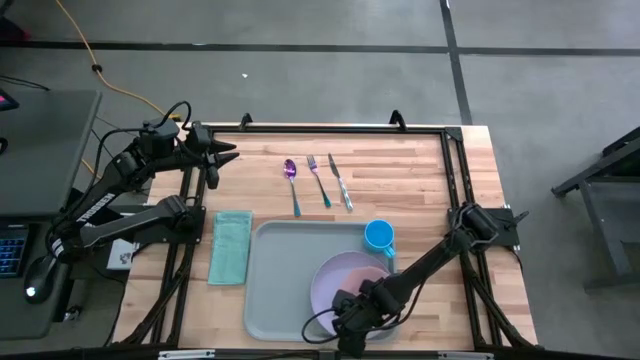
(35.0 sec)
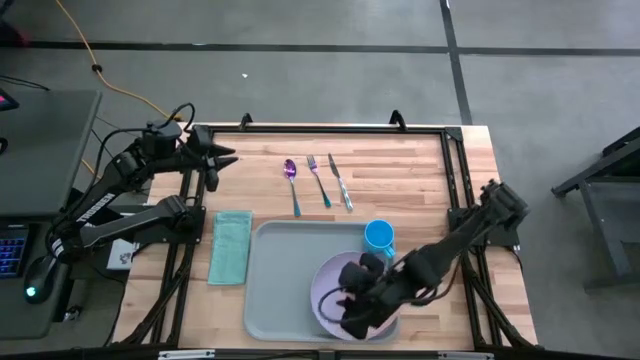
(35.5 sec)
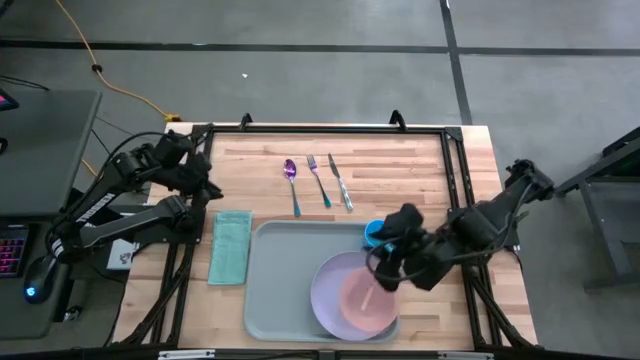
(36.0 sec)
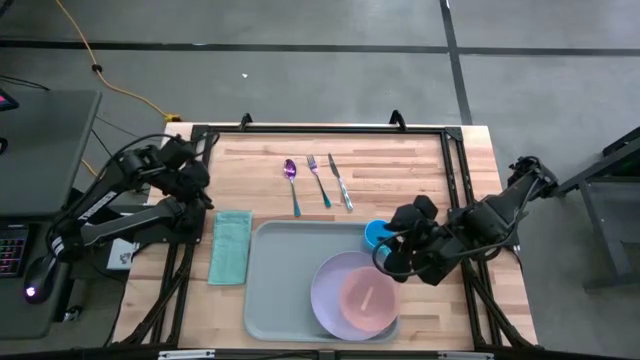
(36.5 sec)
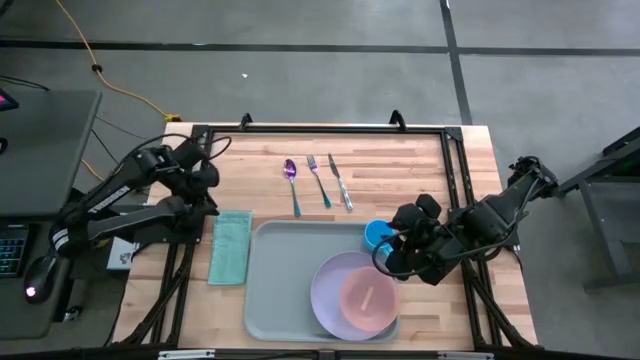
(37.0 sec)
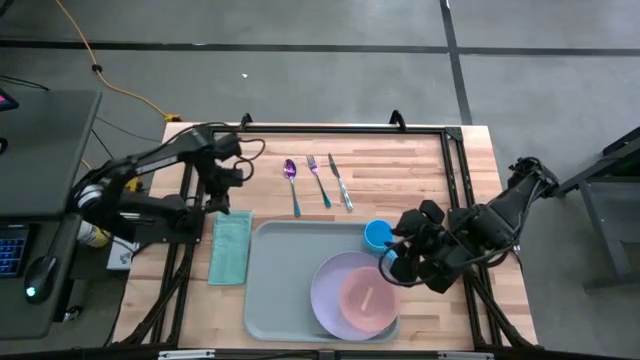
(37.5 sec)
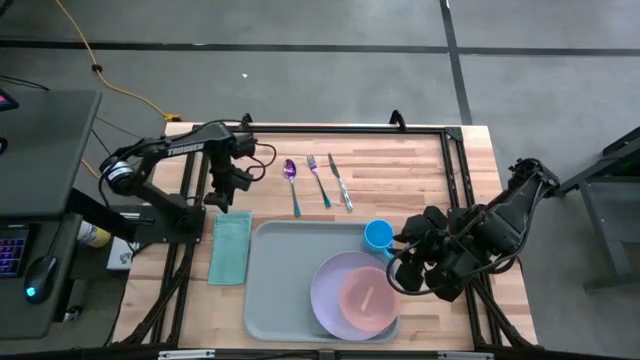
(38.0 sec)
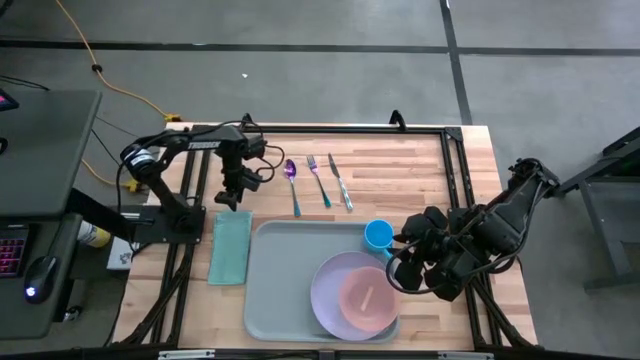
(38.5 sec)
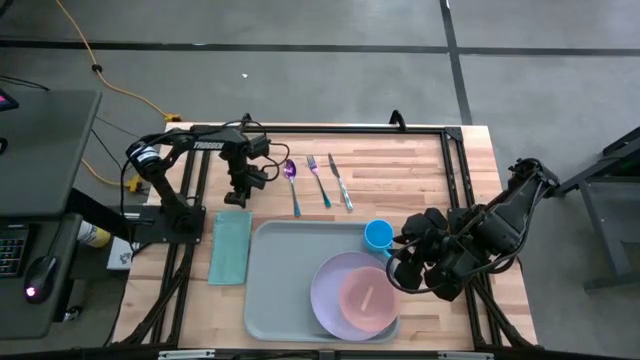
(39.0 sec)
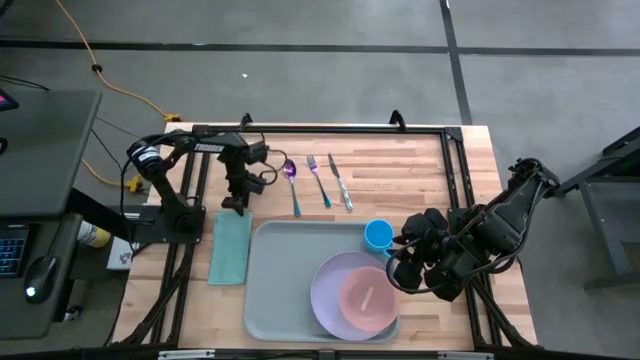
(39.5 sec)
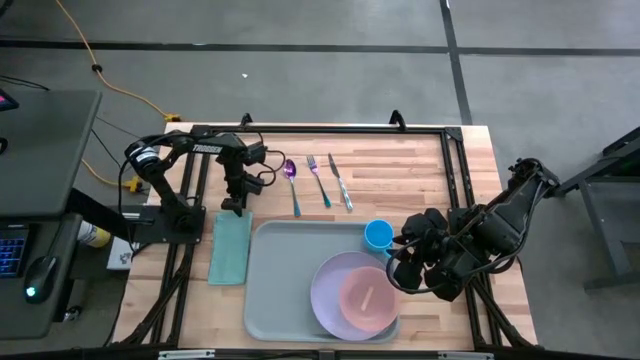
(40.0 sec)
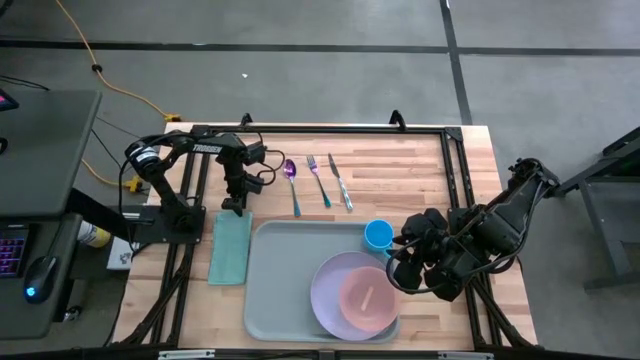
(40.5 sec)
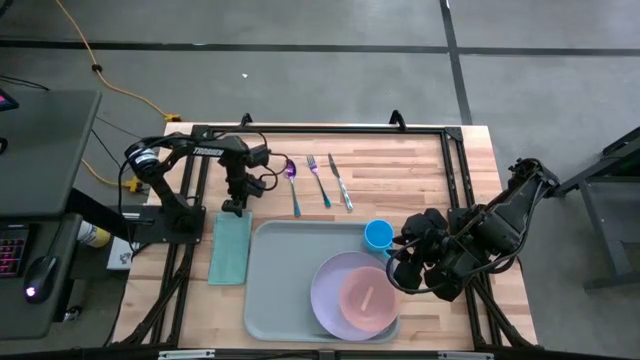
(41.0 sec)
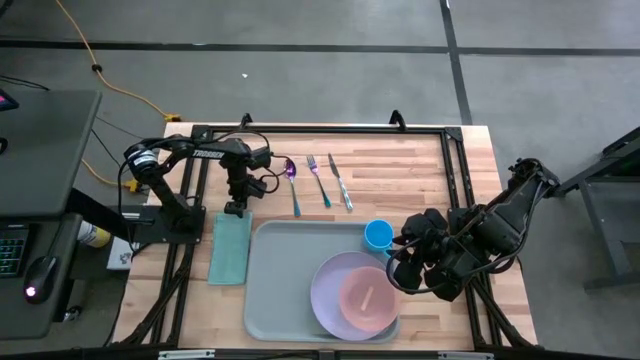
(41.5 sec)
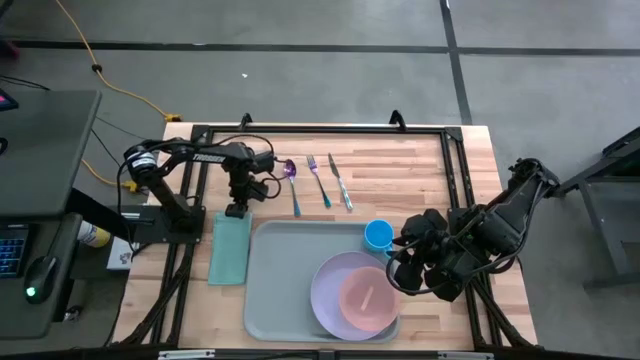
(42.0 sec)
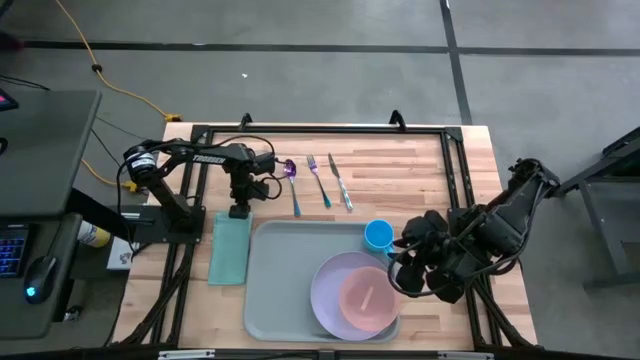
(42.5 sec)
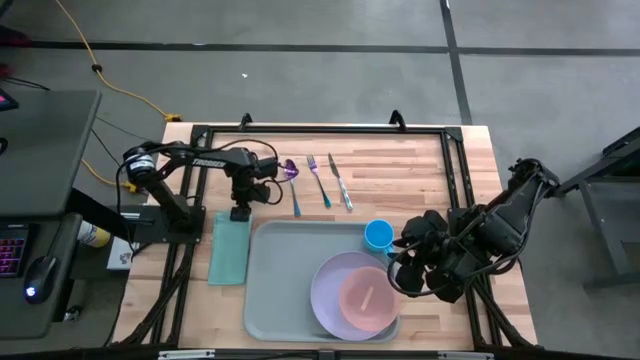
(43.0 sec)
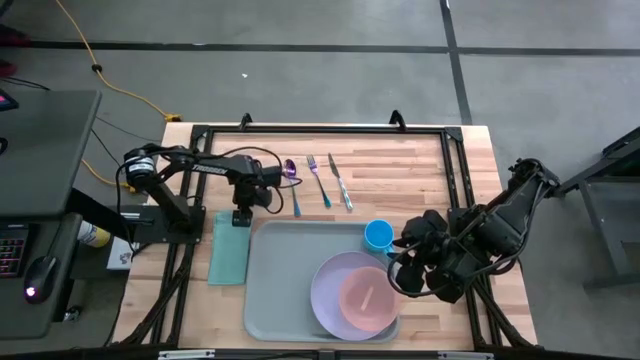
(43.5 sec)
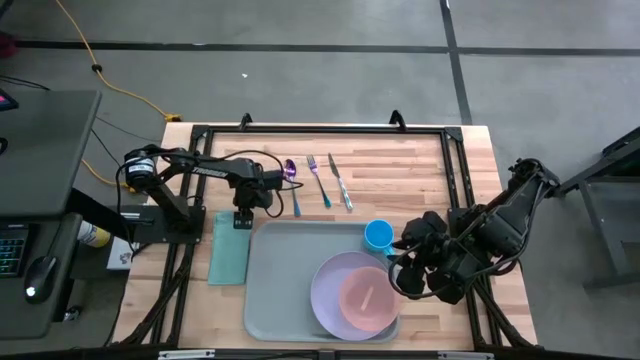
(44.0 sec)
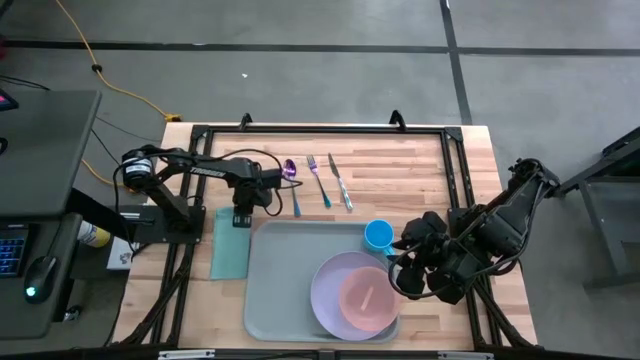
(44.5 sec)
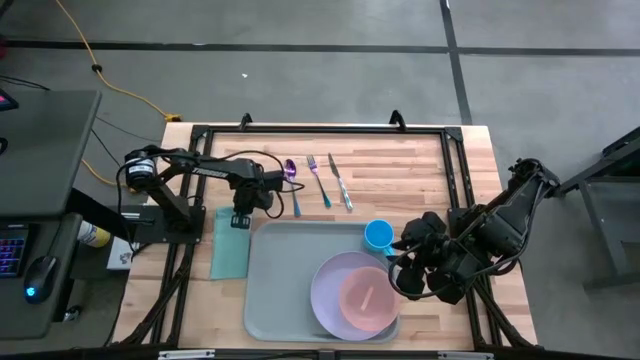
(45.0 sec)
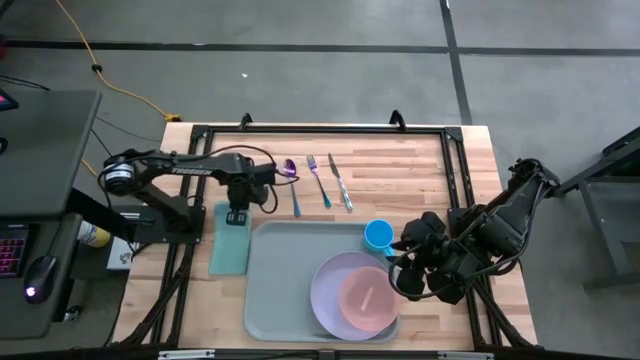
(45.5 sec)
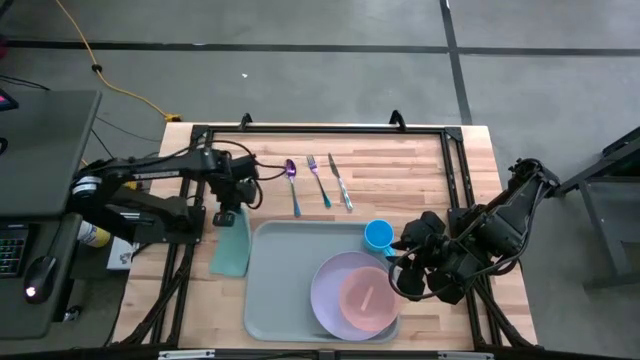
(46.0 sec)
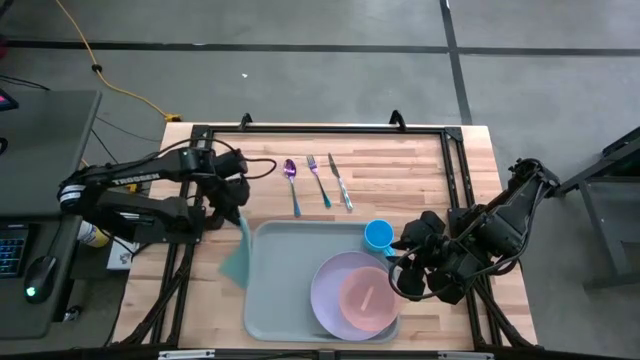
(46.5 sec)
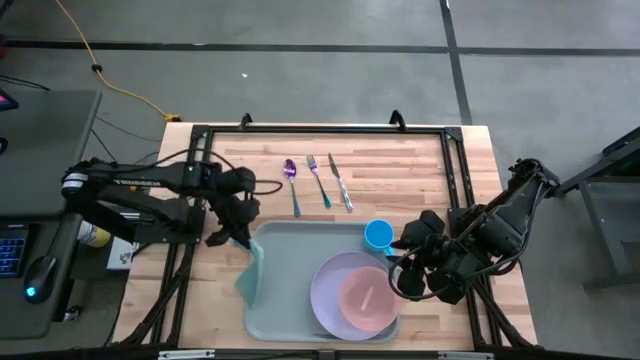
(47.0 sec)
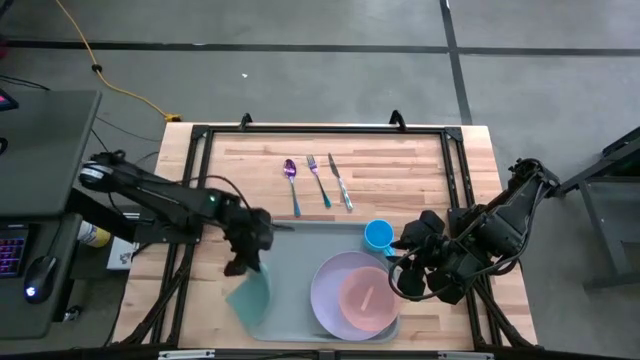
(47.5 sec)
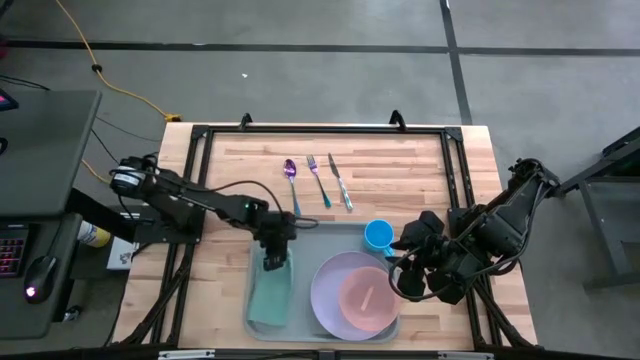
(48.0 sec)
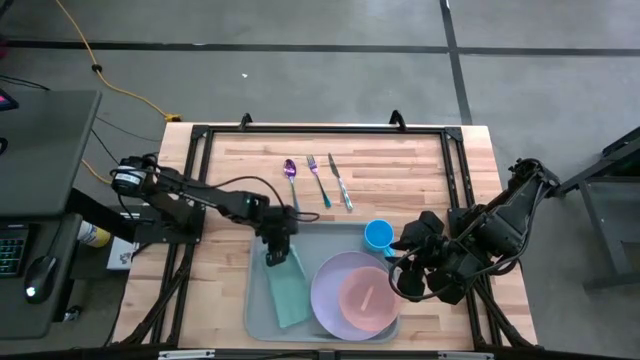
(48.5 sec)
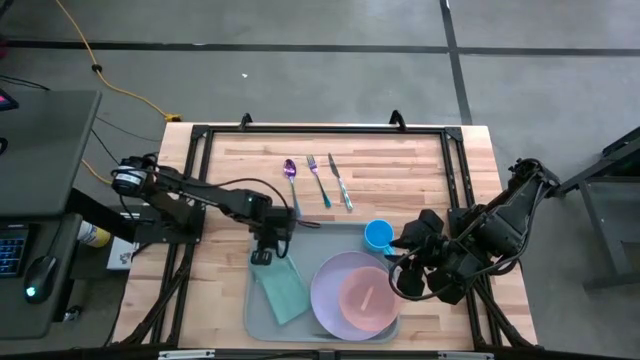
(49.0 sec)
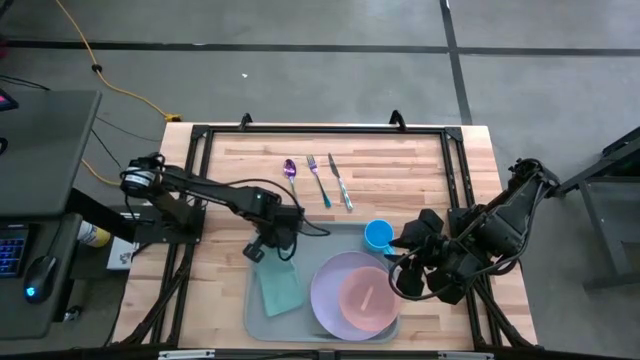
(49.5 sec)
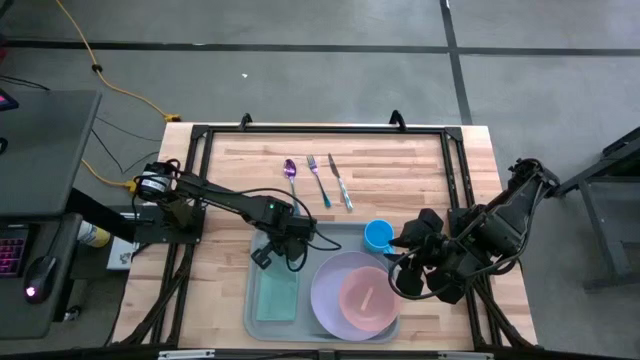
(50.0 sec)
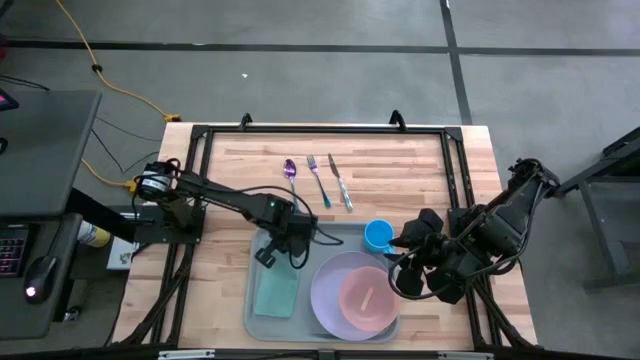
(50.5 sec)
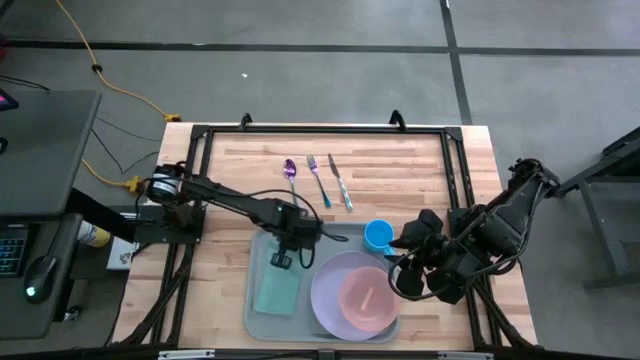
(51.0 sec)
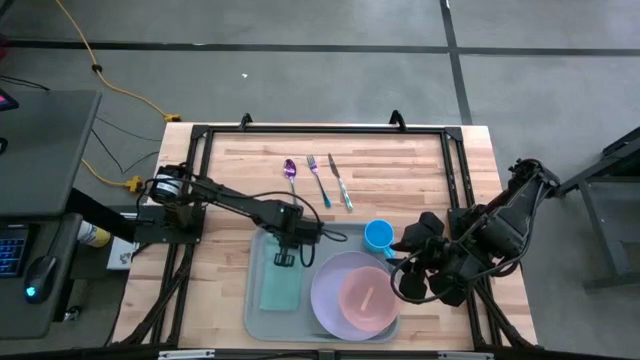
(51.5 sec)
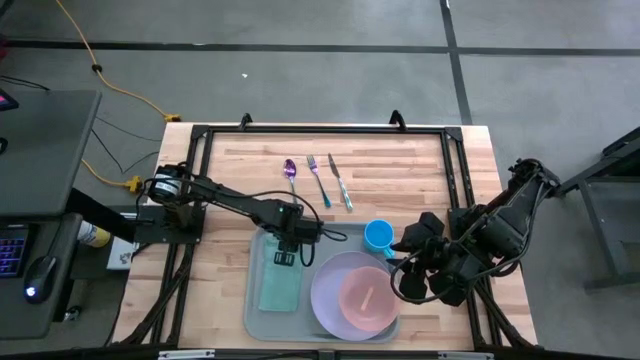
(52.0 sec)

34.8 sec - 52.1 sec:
Task: Set up tray
Put the light green table napkin on the gray tray to the left of the violet plate

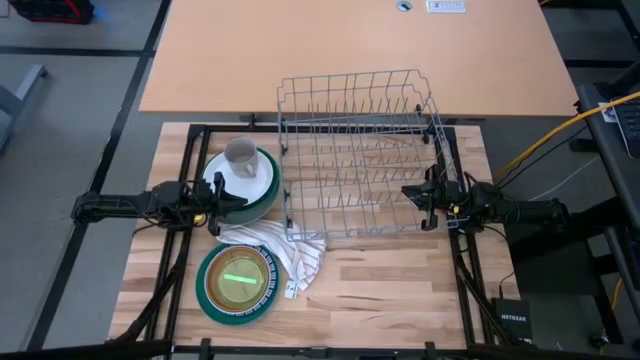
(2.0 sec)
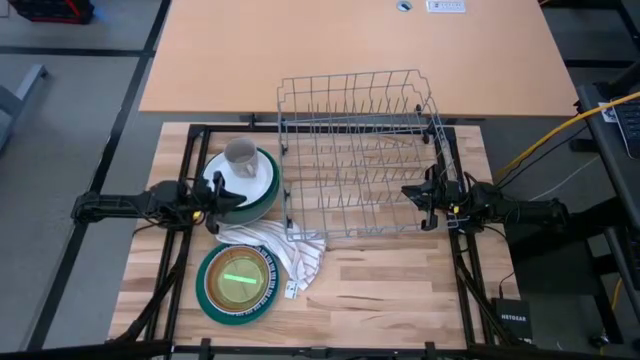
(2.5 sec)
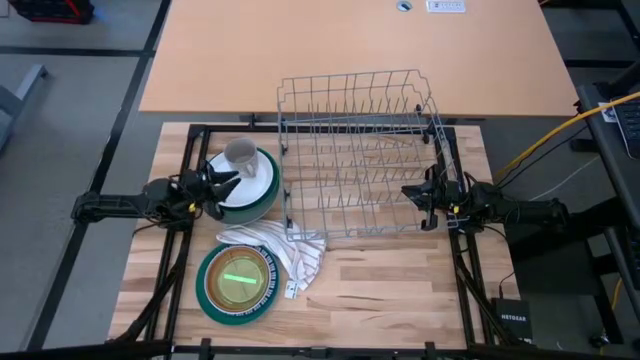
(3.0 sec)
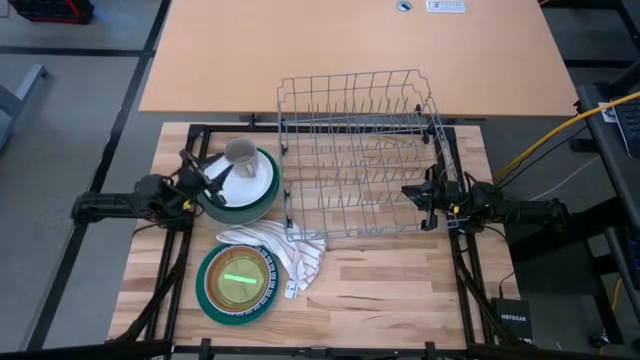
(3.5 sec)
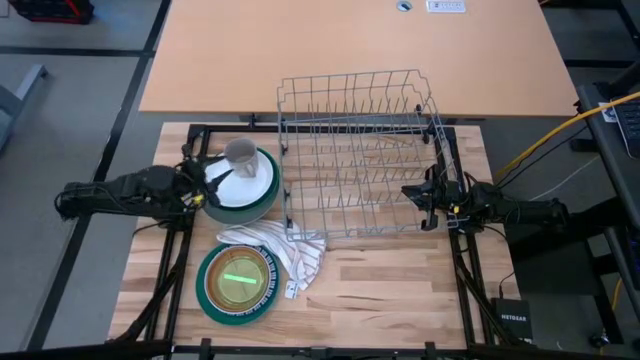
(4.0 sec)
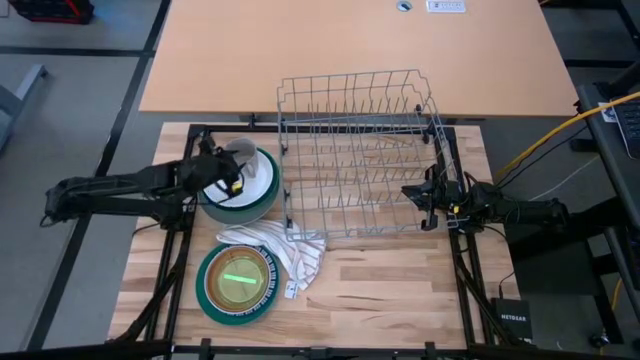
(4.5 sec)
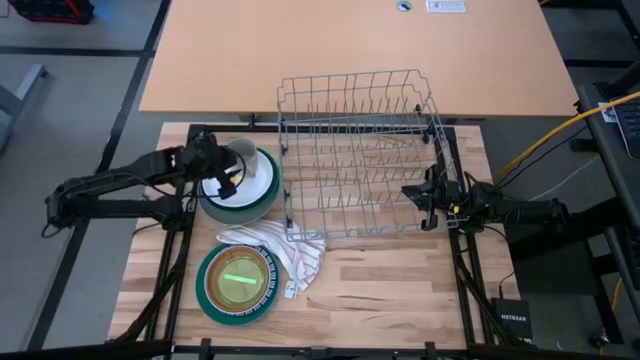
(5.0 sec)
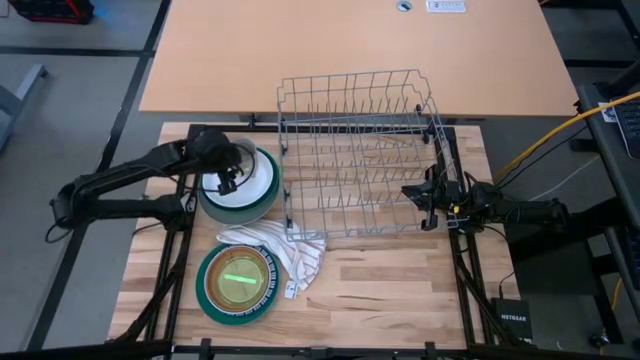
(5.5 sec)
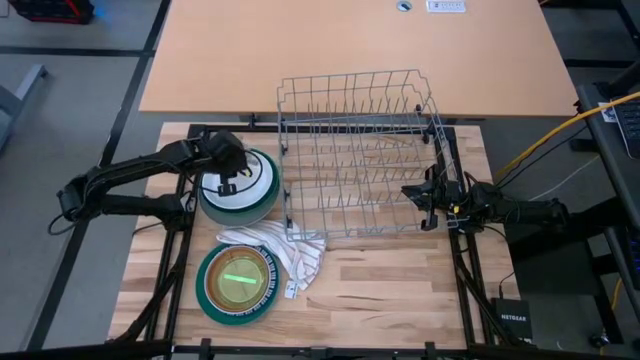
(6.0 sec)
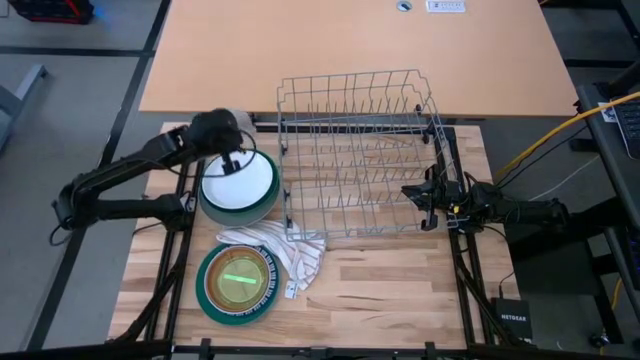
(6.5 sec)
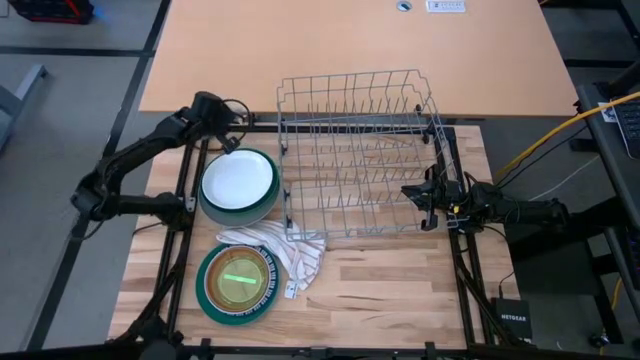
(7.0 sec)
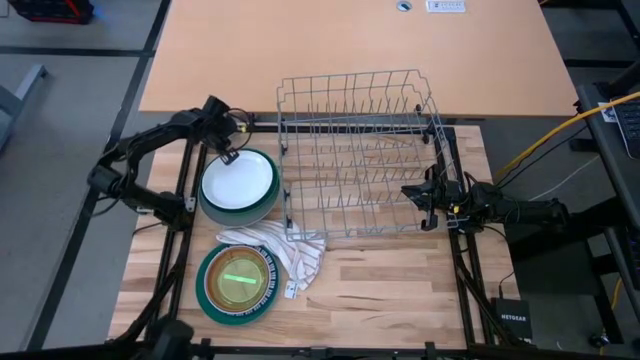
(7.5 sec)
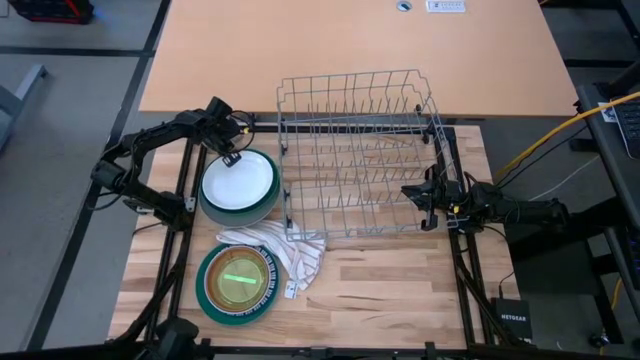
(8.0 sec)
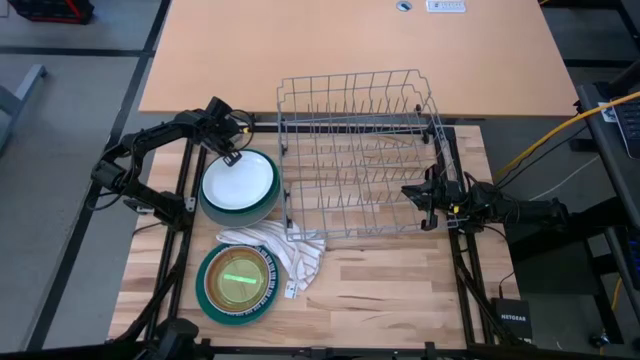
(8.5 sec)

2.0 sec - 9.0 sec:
Task: Sort dishes
Remove the white mug from the white plate
